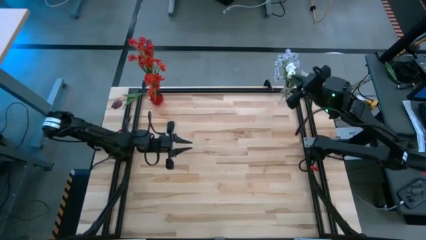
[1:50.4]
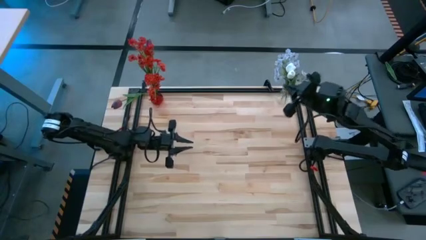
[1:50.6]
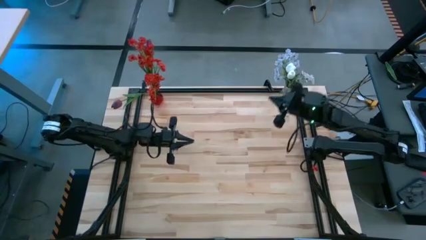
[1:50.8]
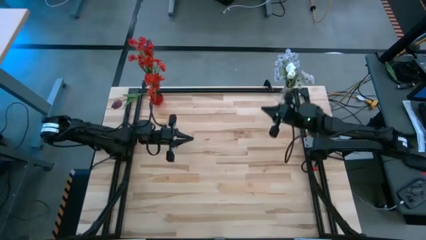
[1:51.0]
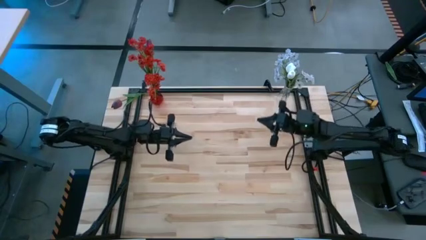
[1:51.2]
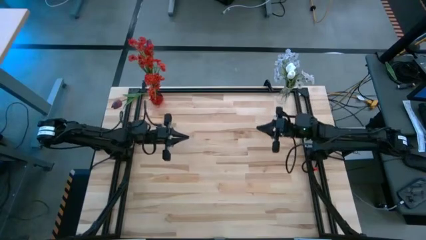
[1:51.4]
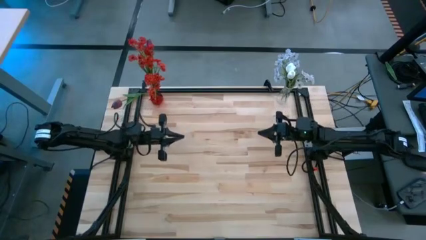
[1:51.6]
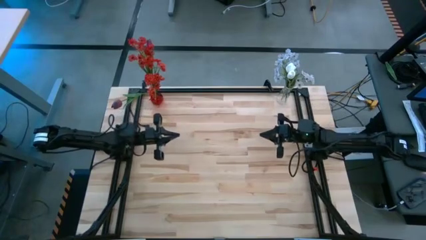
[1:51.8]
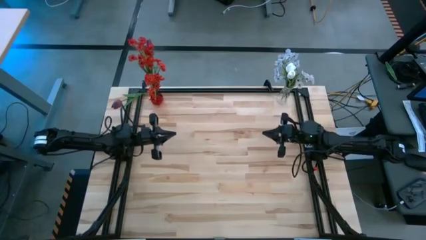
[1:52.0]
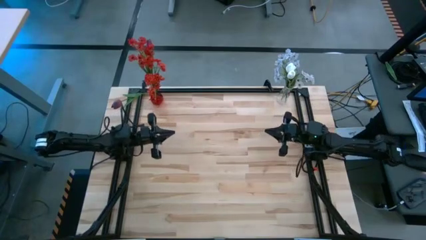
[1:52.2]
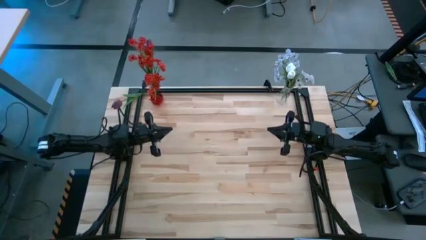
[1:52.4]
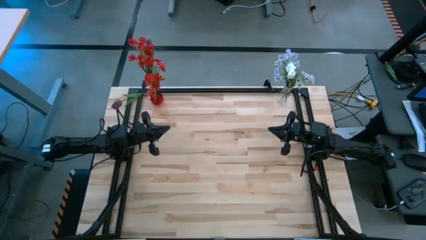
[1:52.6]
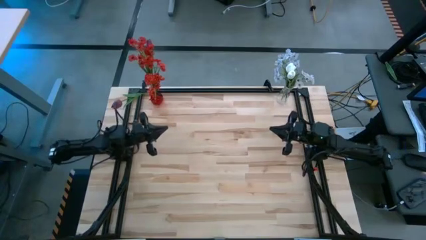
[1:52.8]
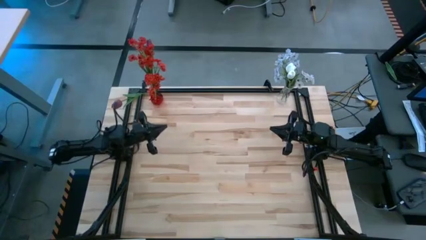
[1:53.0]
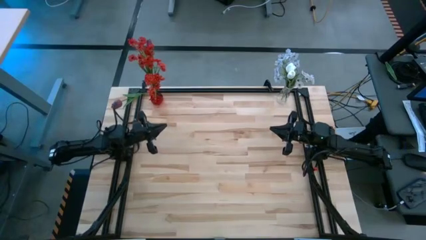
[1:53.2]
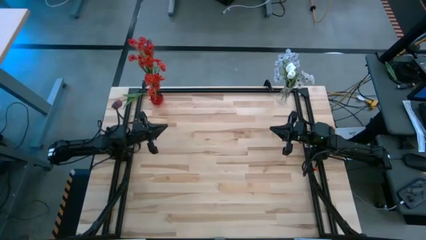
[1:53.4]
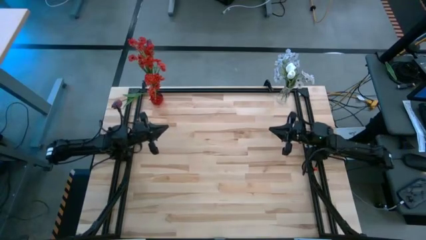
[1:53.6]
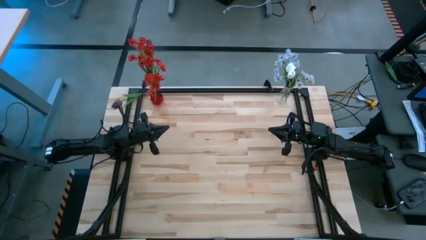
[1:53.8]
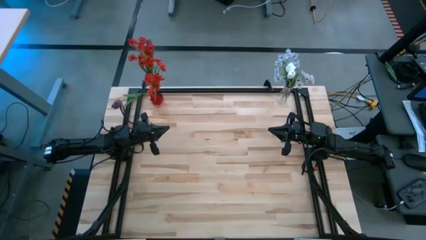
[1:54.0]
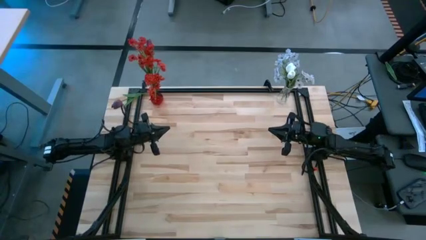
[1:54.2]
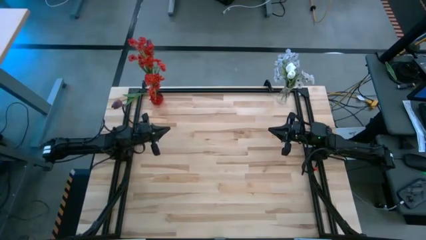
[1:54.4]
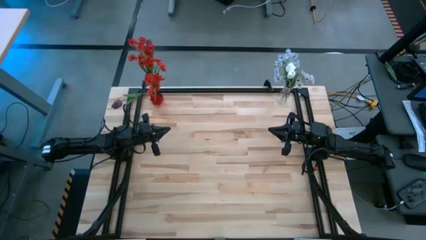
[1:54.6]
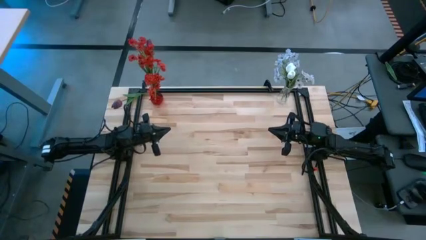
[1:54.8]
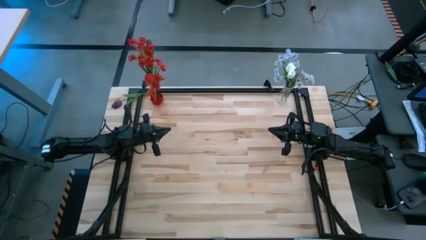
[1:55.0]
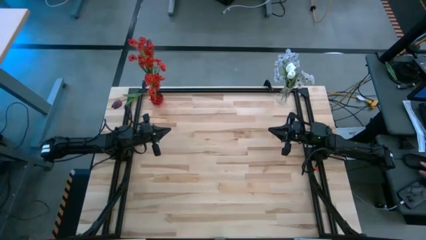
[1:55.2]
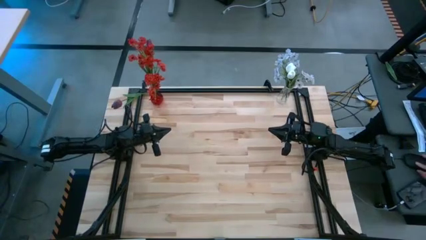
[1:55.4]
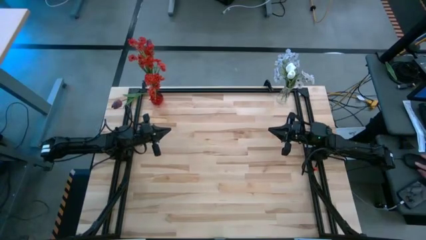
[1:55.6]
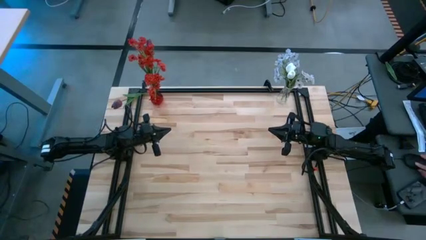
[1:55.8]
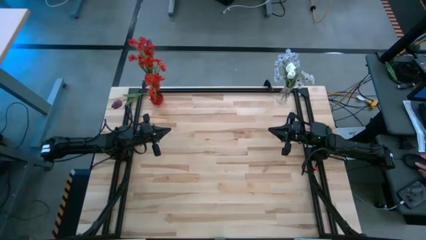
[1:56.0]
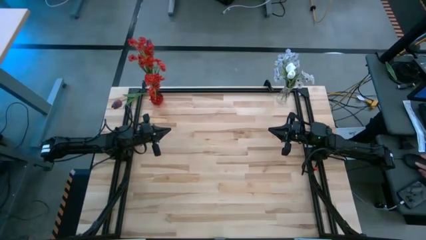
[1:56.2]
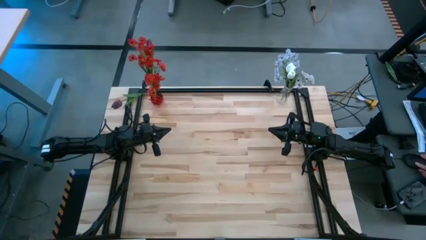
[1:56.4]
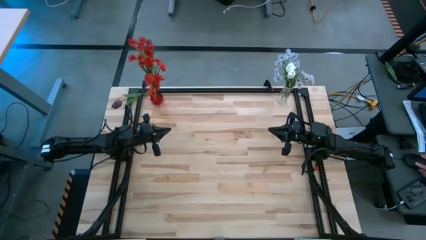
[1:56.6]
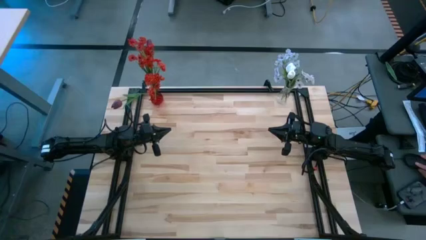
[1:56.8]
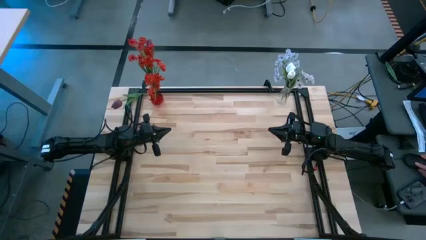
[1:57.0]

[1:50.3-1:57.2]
Task: Sort flowers into vase by color
Return to Home Position

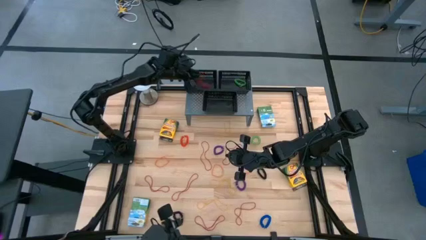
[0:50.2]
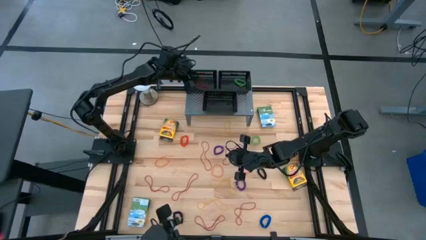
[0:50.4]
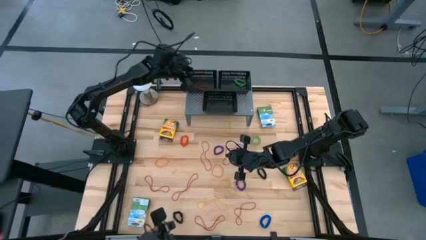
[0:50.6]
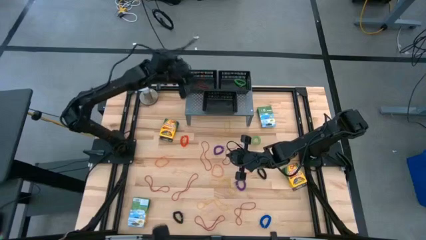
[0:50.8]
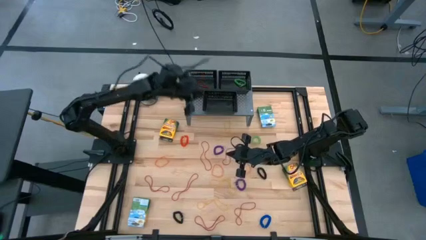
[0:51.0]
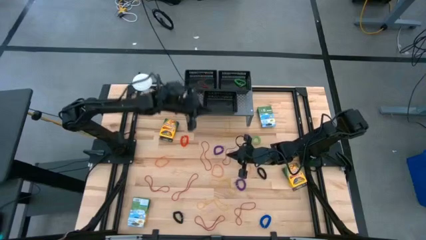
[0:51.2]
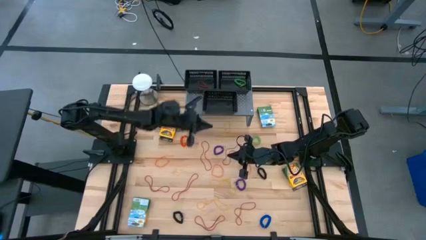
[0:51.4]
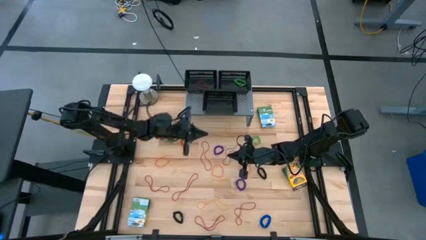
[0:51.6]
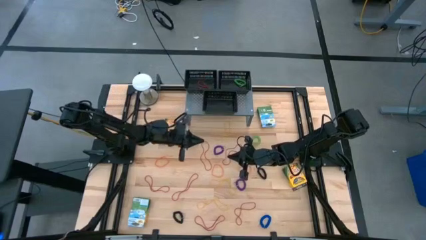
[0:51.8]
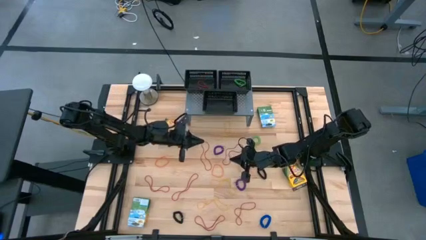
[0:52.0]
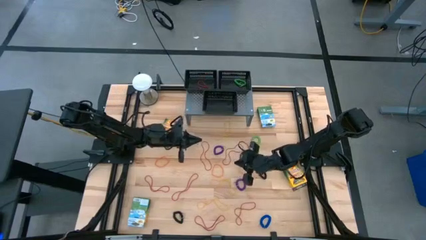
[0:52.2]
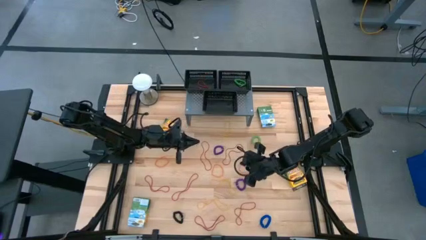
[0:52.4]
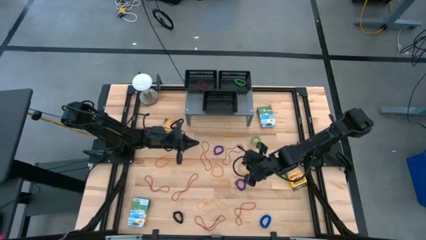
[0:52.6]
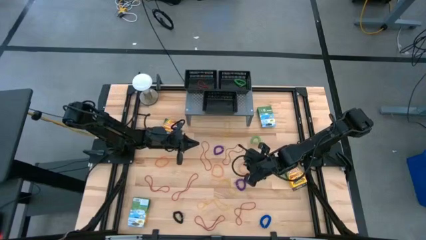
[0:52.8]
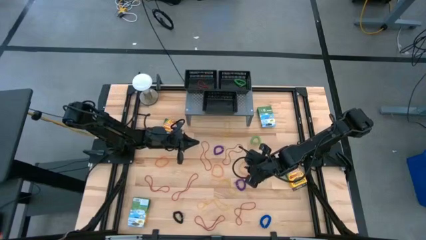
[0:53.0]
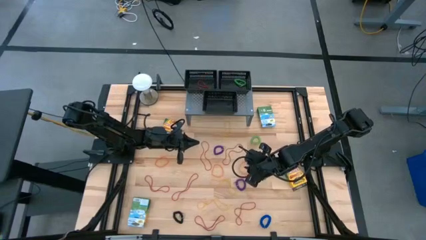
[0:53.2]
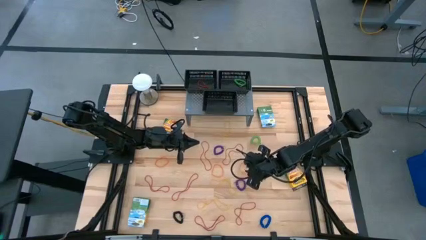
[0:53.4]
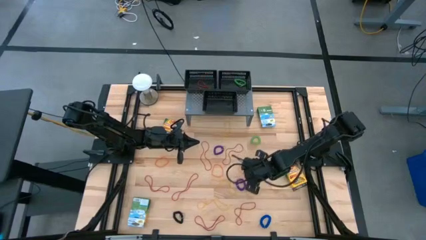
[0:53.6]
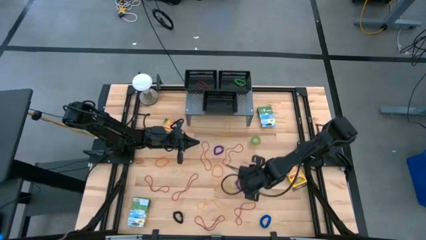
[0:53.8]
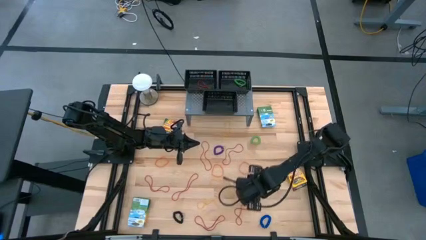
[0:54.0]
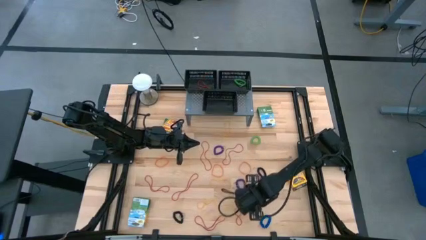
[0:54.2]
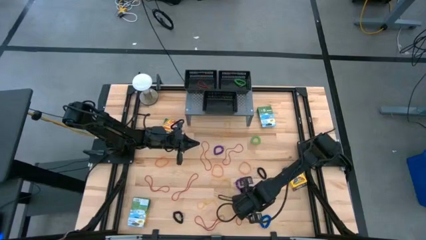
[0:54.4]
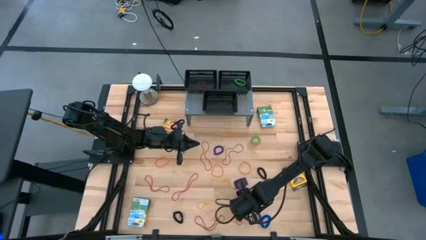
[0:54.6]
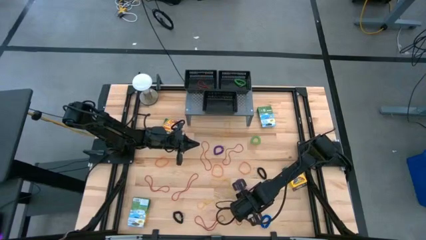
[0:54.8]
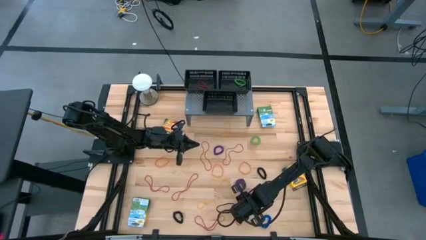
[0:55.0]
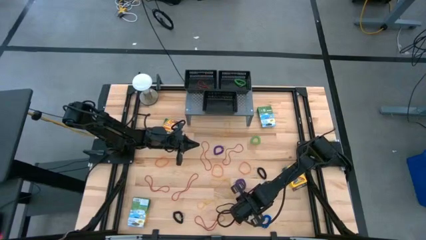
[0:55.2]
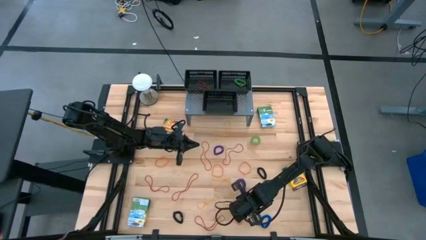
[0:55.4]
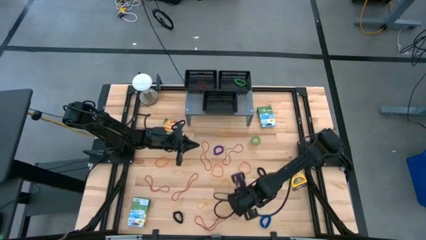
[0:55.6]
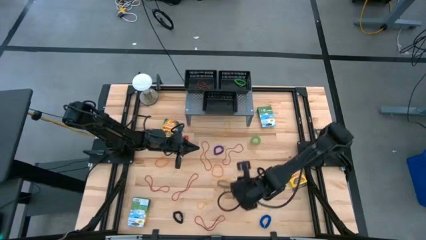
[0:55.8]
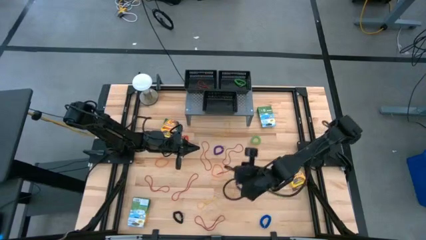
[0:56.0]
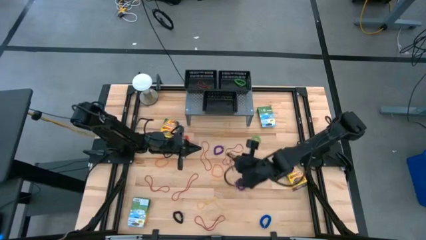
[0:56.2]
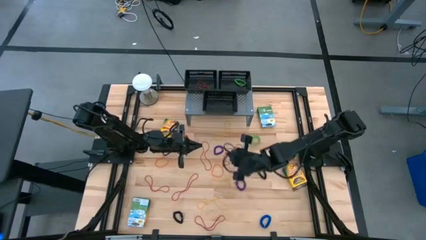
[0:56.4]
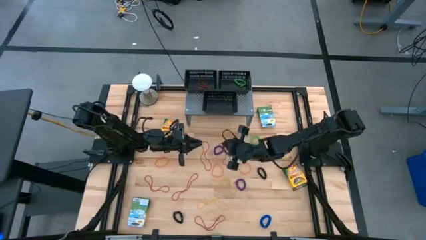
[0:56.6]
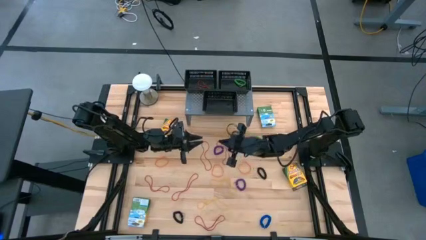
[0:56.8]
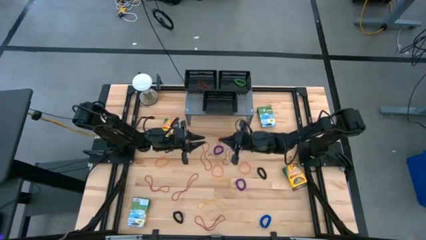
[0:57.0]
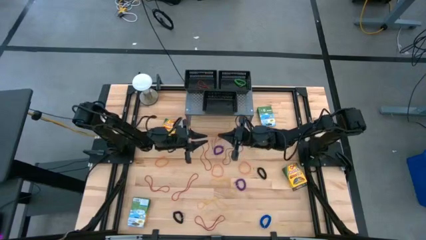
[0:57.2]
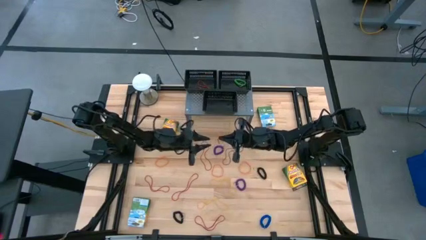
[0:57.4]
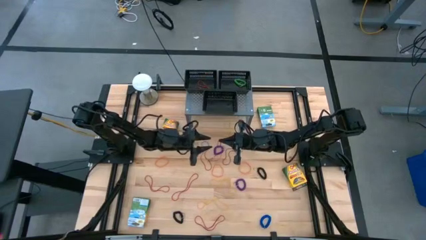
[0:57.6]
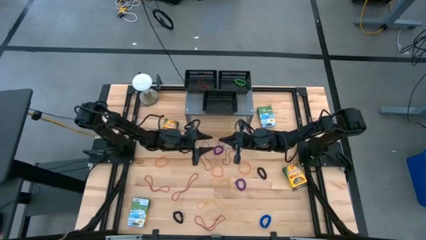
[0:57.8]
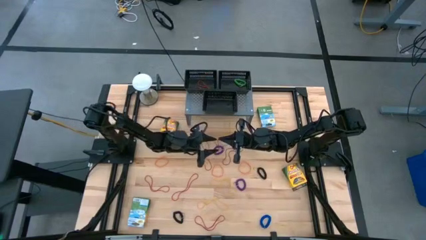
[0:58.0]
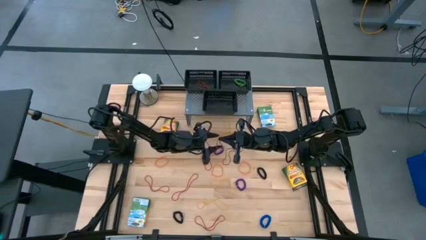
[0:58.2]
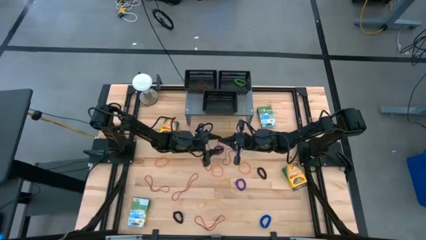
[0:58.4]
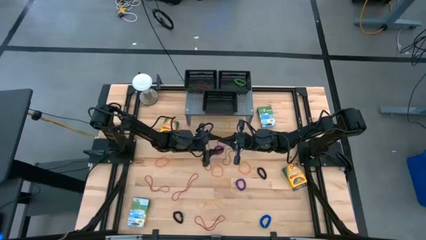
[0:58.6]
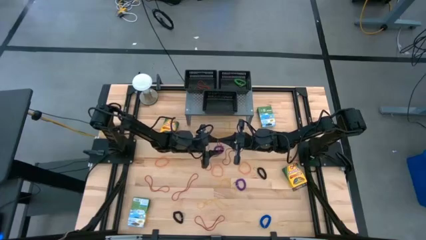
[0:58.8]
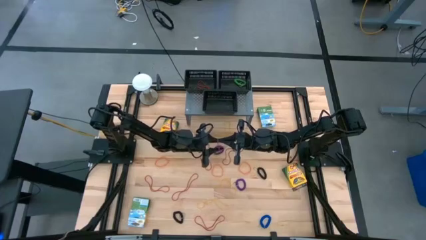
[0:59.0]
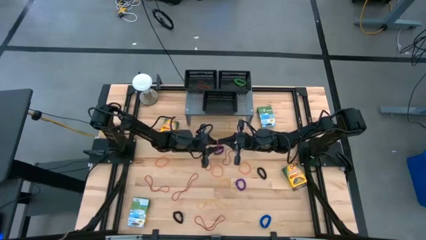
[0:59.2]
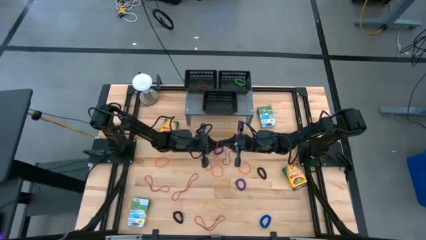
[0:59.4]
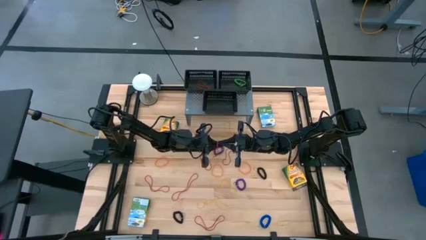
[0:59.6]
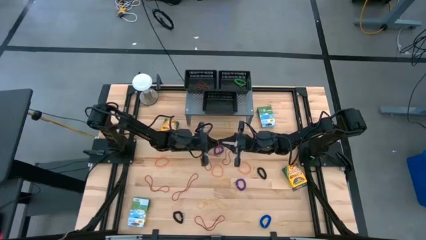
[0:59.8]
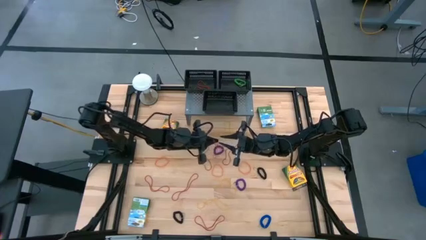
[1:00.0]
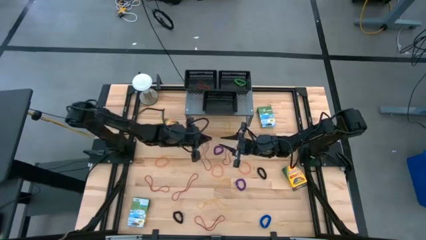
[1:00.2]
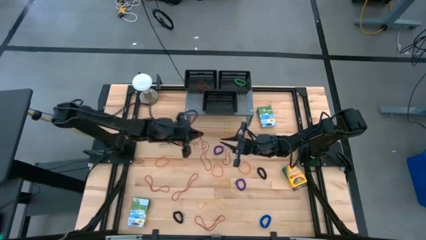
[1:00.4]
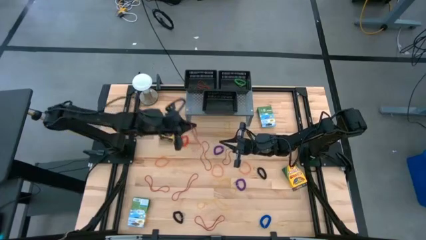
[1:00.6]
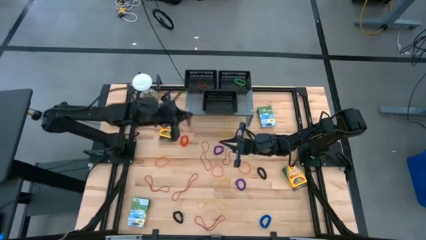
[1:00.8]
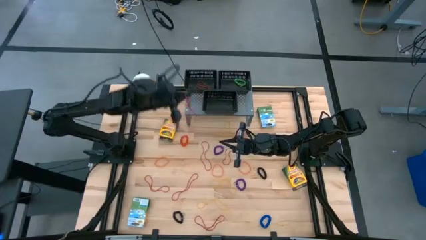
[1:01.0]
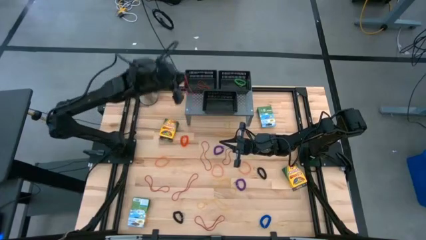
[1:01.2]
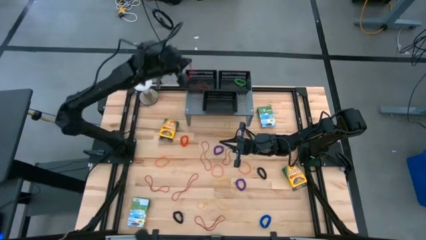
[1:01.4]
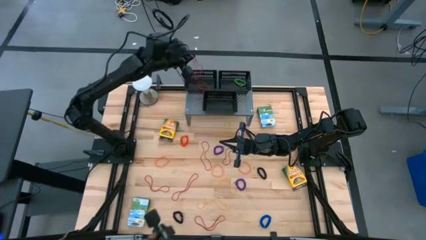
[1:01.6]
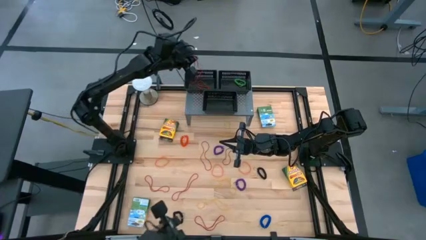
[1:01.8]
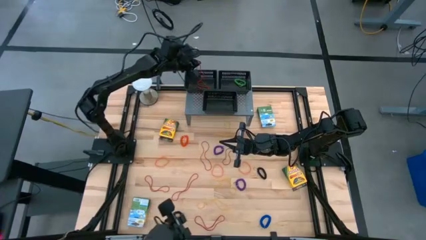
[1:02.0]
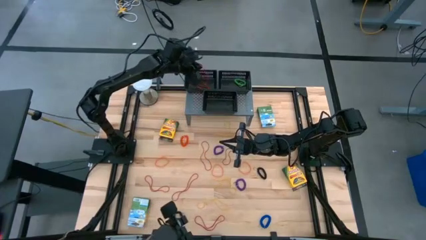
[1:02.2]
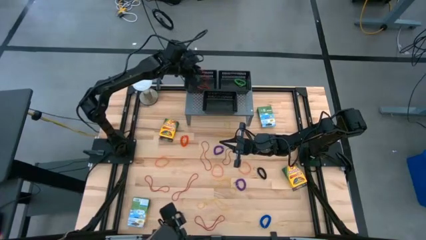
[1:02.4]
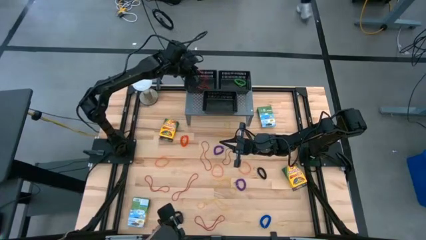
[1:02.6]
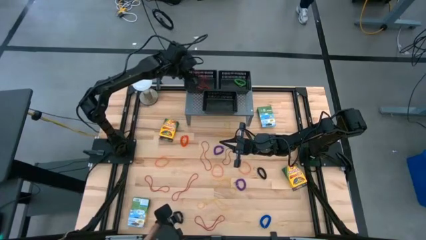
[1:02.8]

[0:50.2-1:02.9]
Task: Pick & Place Office Desk Supplies
Put the red rubber band into the top left black basket on the shelf
